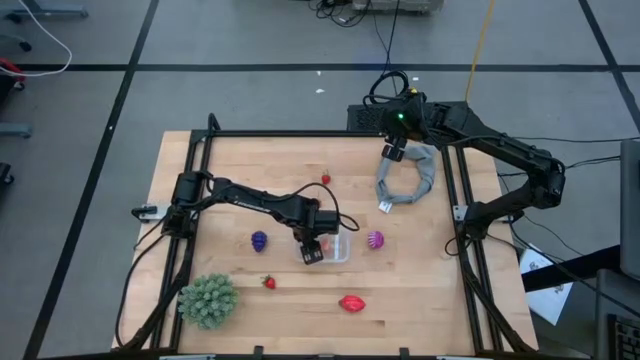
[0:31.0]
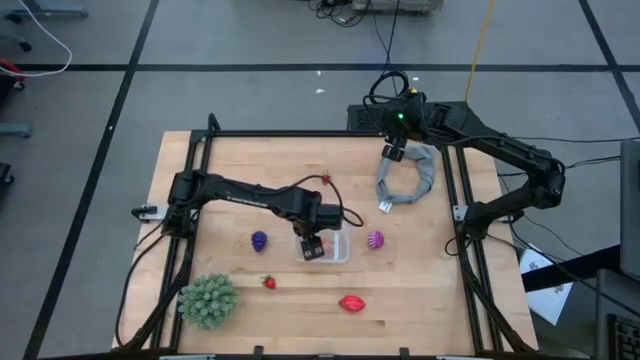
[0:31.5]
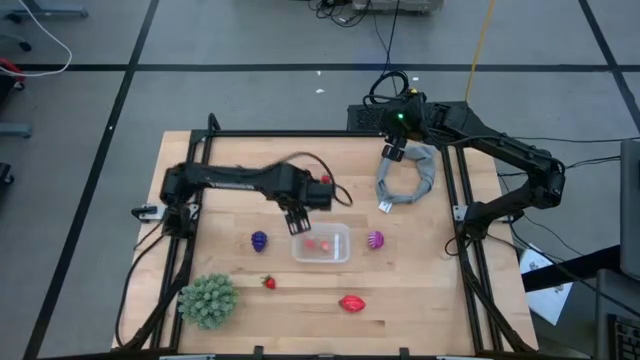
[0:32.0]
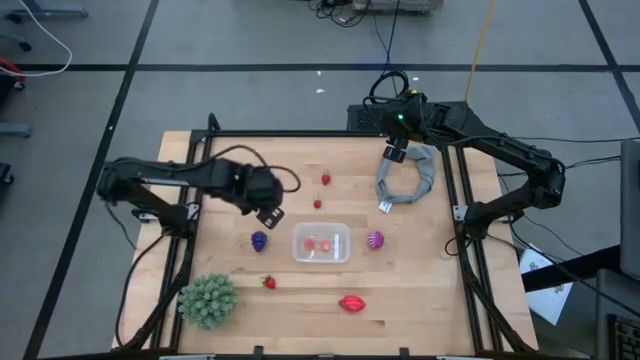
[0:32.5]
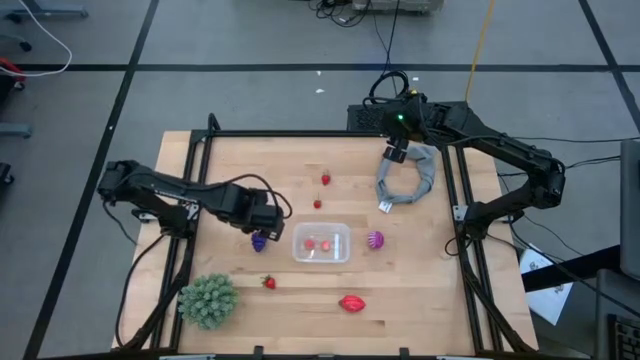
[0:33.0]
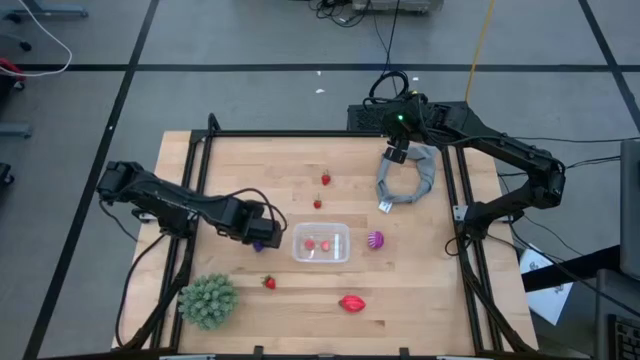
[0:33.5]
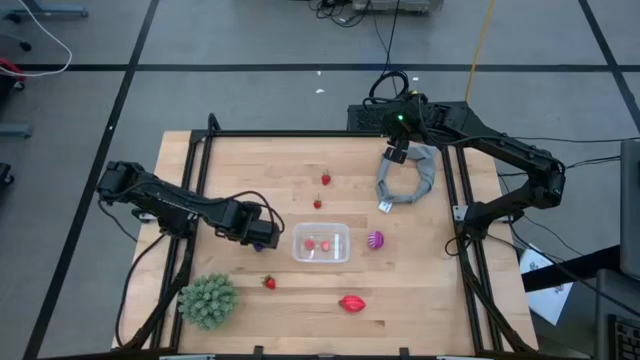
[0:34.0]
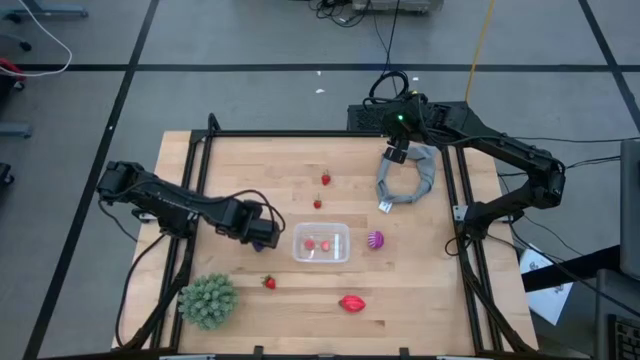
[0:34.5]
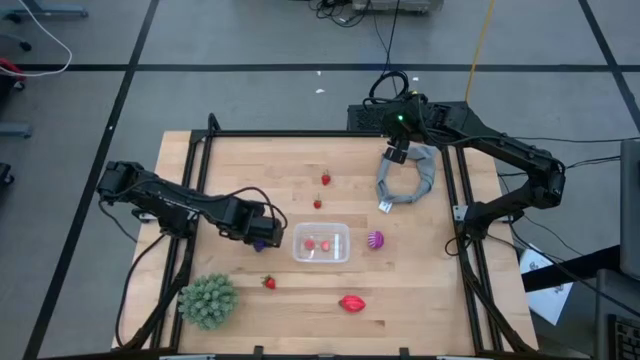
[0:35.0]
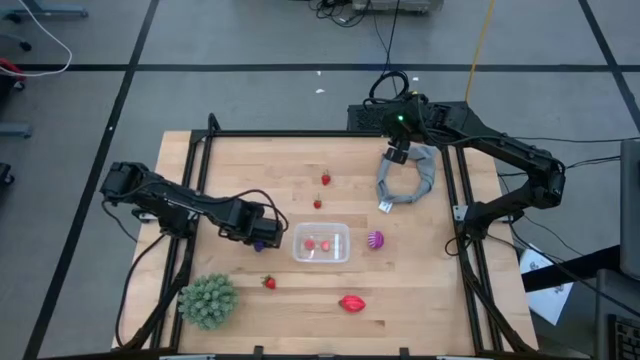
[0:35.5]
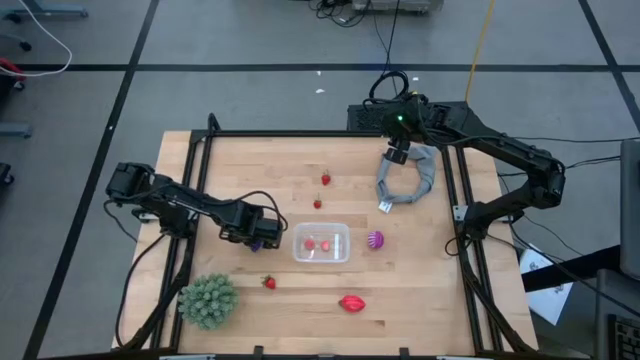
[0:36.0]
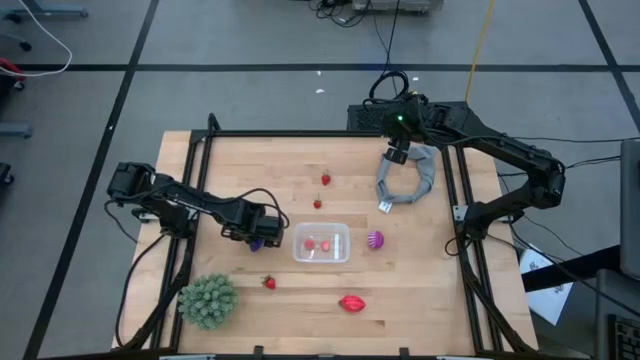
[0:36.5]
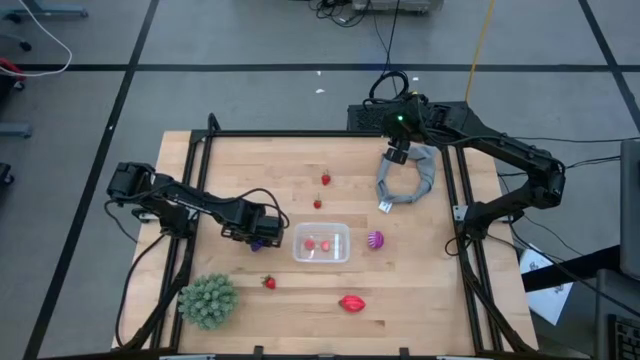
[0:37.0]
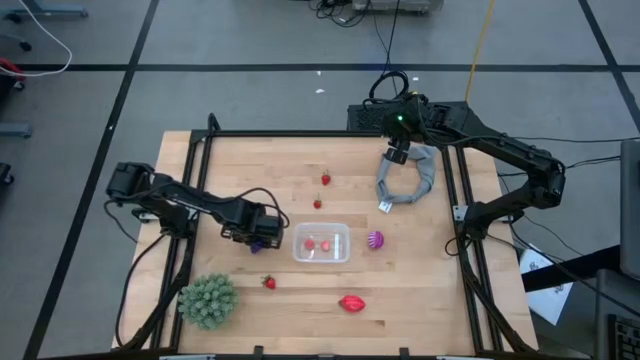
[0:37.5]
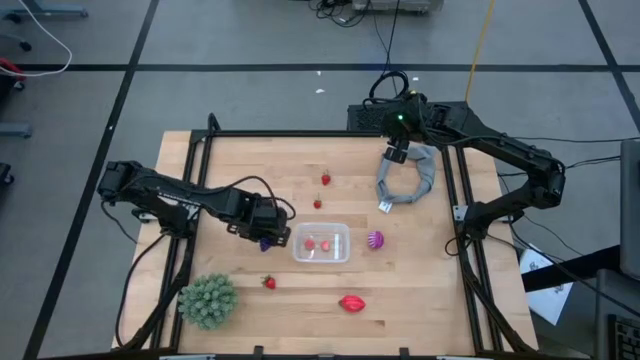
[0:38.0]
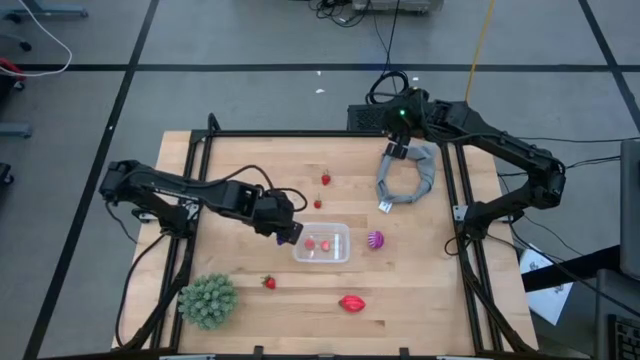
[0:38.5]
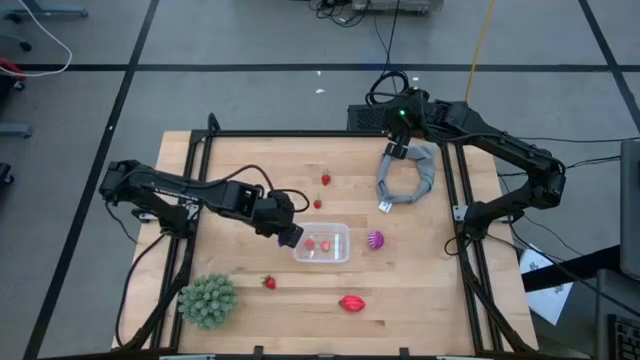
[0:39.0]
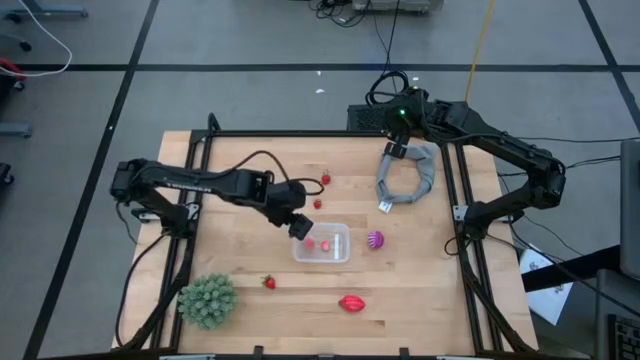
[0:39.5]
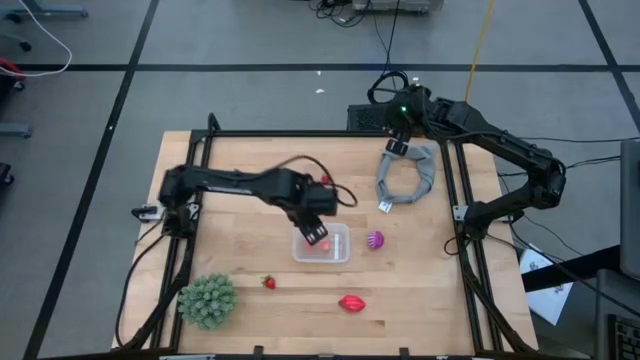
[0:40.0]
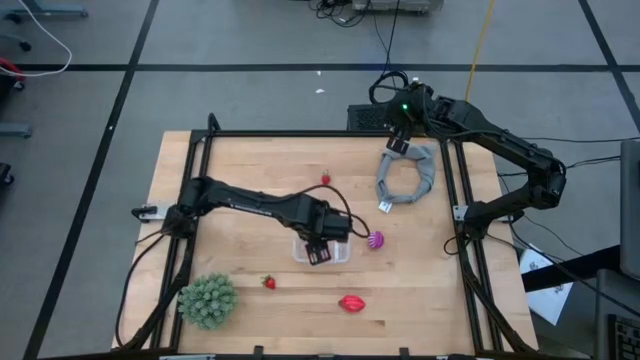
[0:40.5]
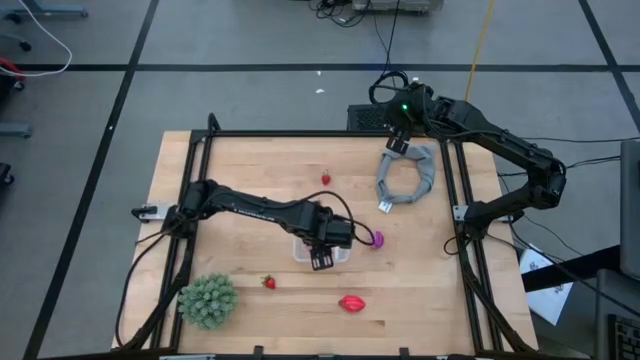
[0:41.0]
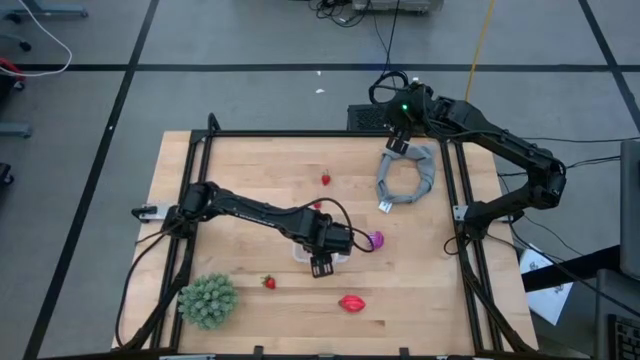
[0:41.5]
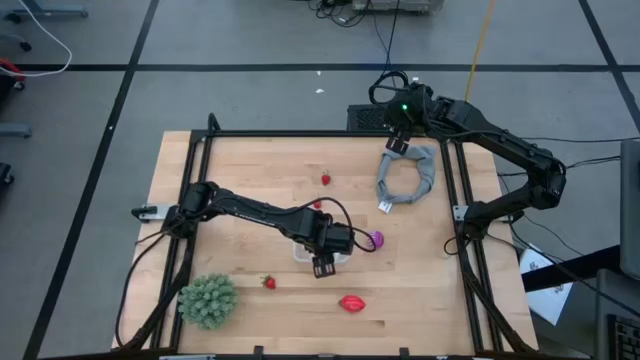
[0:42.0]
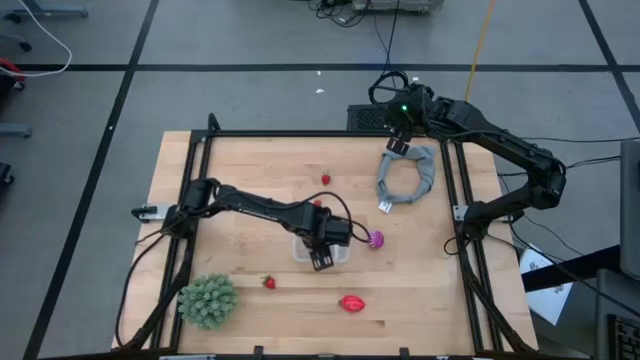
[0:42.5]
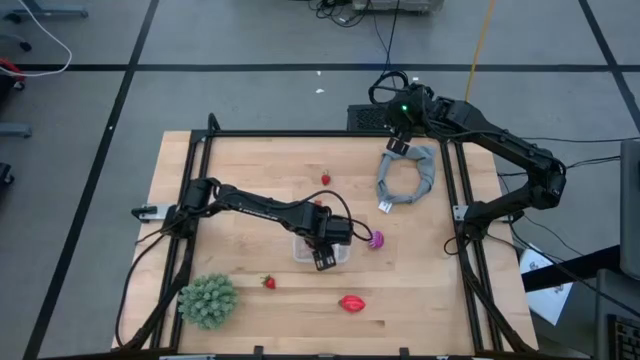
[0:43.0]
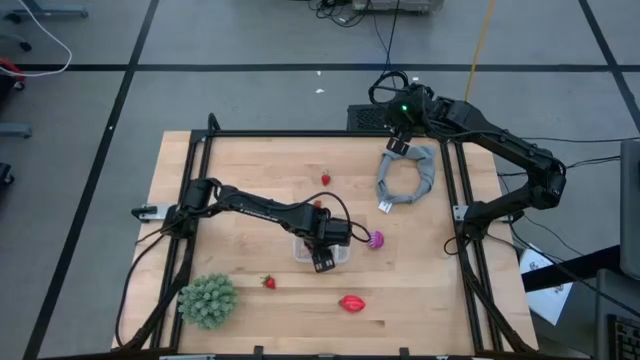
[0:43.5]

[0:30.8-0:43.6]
Task: Pick and placing Produce into tupperware
Put the grapes into the bin

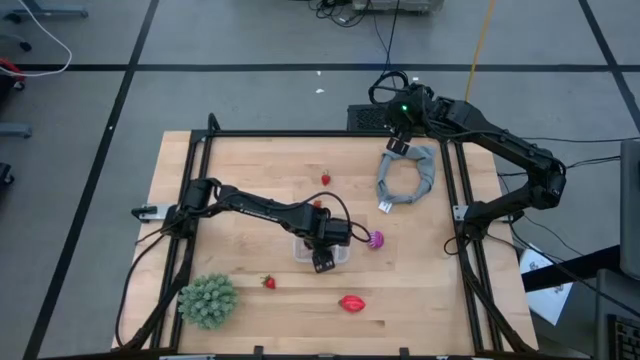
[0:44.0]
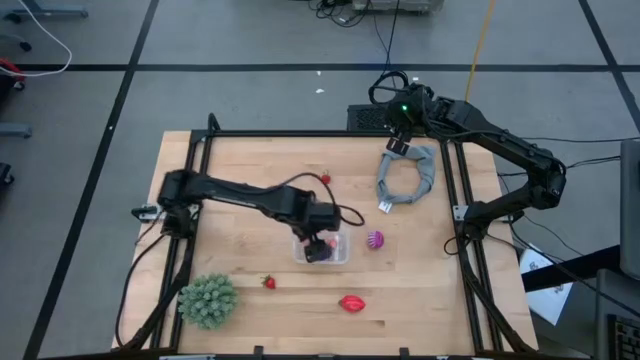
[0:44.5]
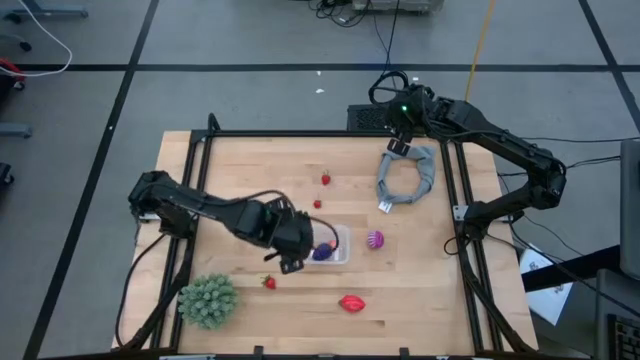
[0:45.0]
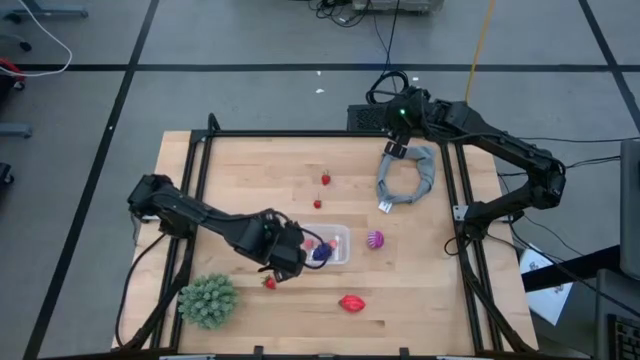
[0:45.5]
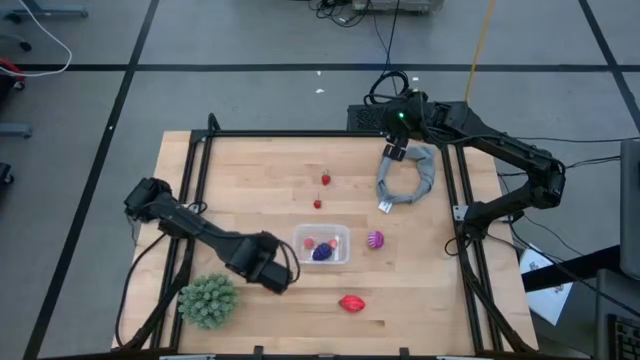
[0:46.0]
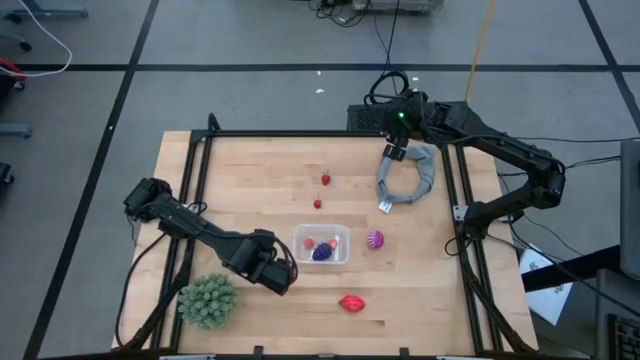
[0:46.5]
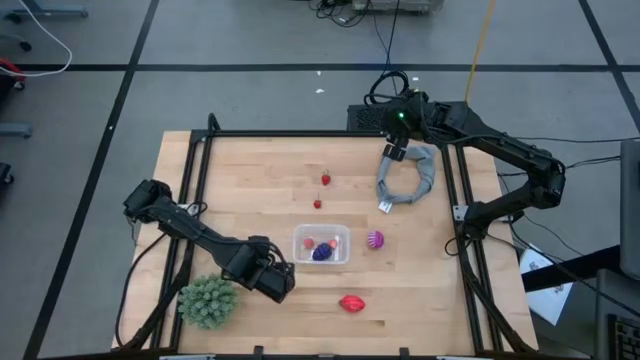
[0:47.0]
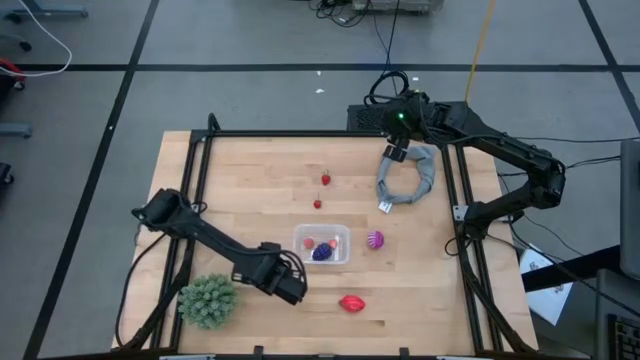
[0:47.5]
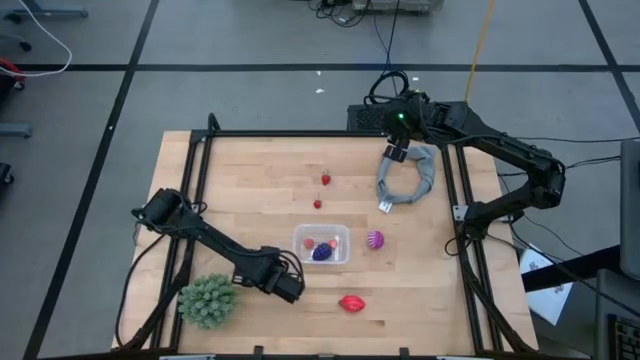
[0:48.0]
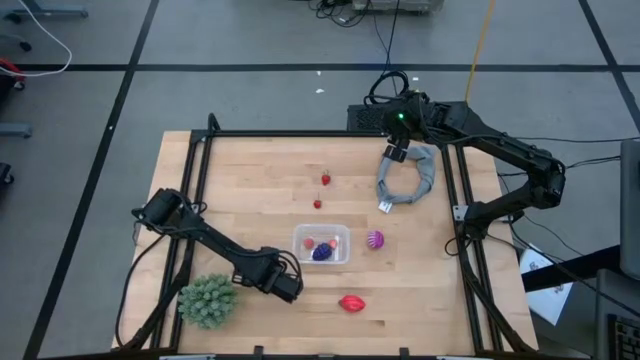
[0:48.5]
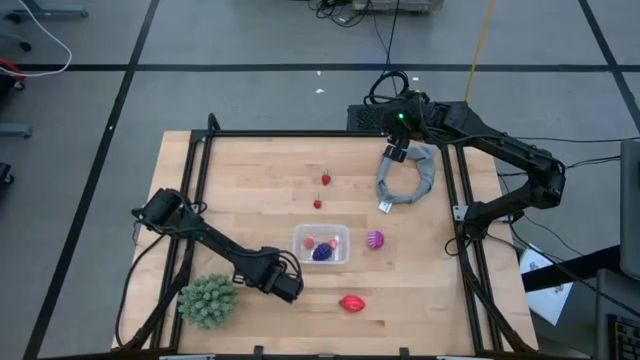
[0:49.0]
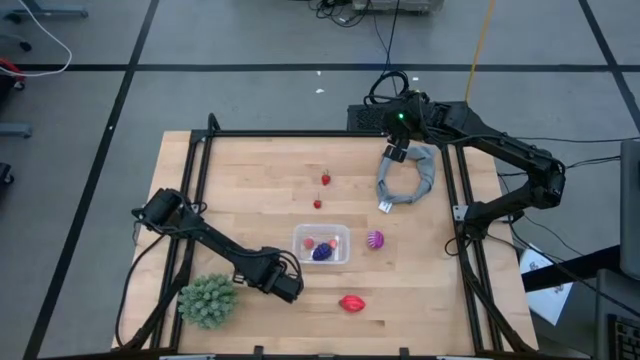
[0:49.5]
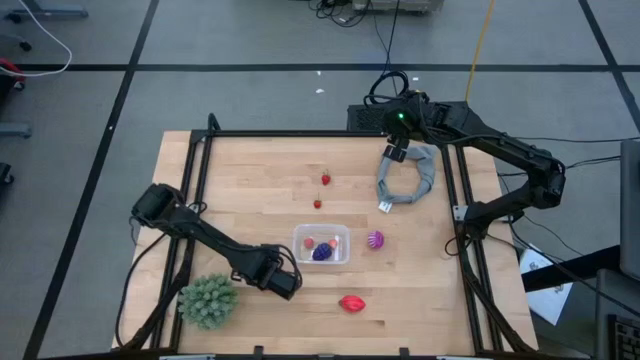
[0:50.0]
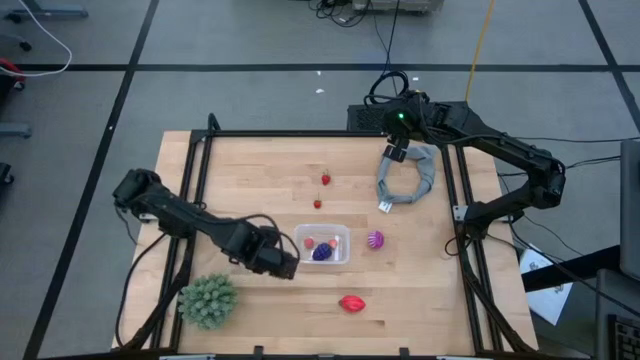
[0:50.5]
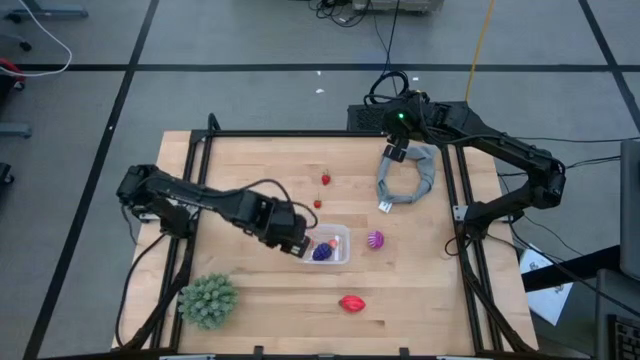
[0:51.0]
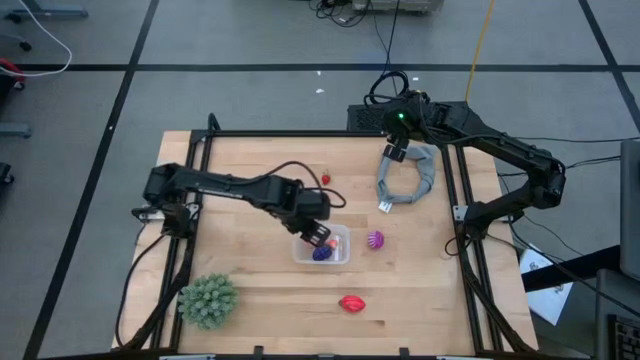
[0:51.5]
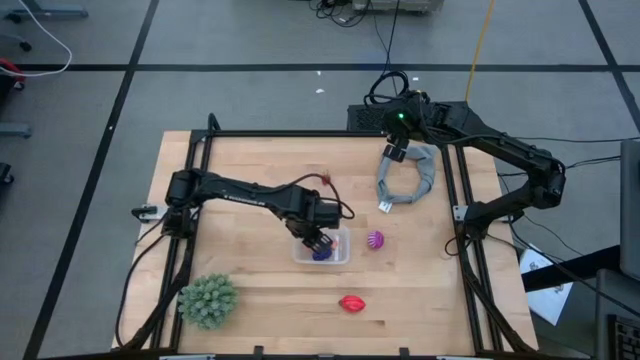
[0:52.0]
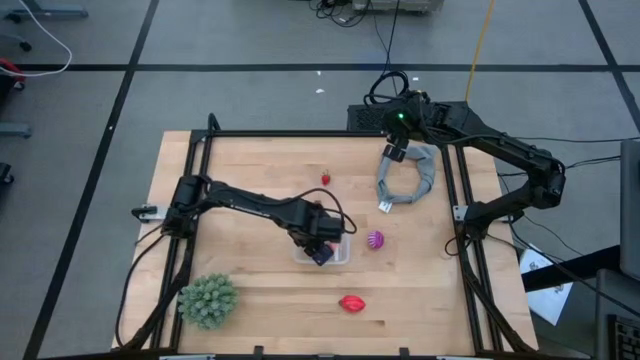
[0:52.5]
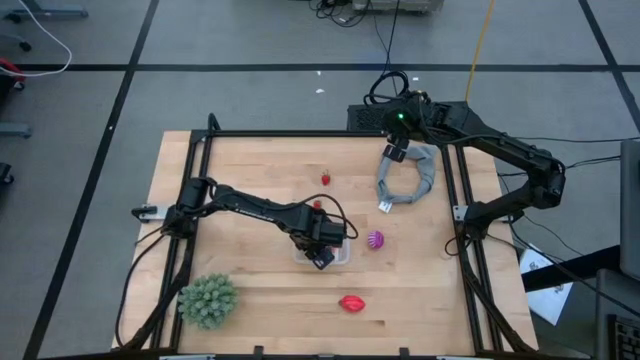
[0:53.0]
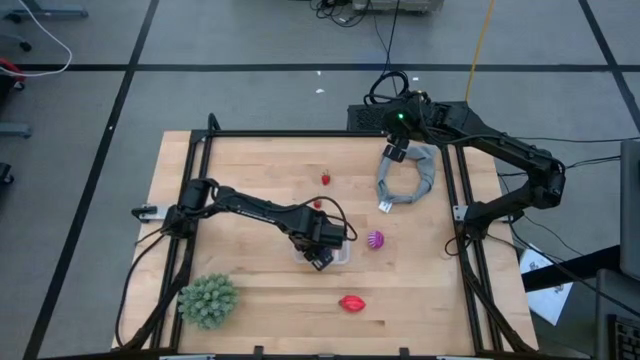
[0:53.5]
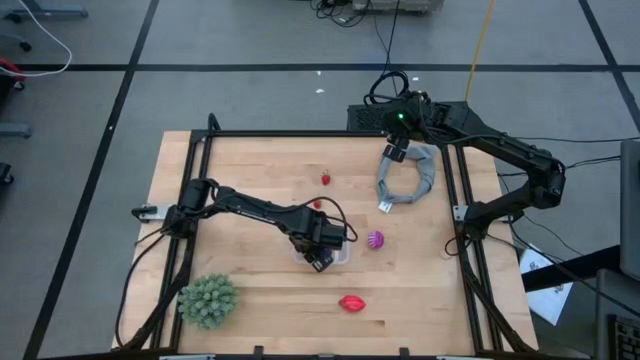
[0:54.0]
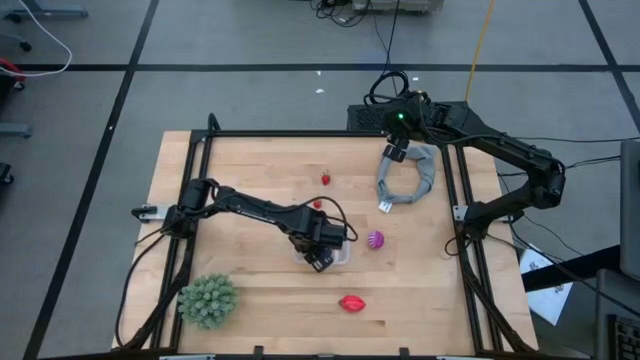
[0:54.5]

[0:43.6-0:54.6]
Put the bottom strawberry into the bin
